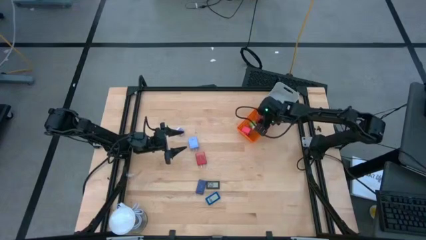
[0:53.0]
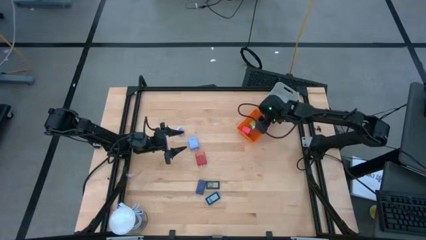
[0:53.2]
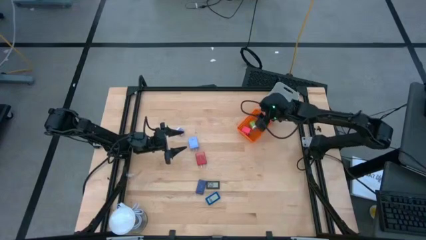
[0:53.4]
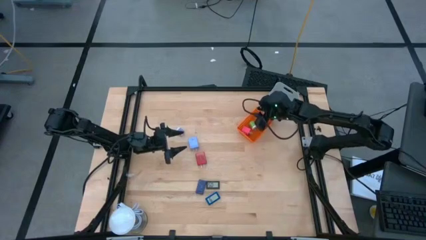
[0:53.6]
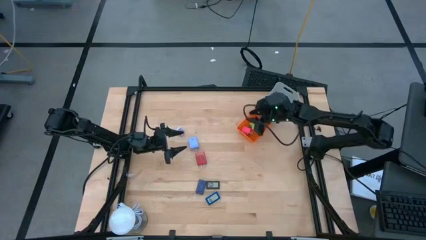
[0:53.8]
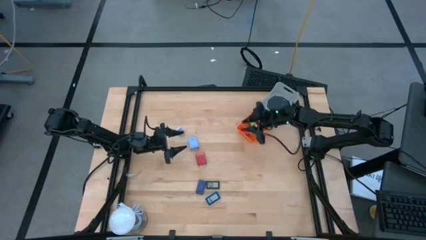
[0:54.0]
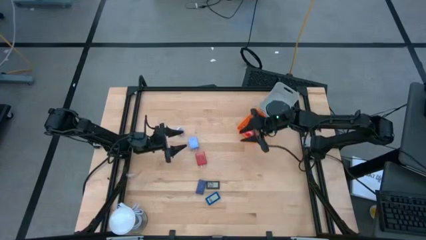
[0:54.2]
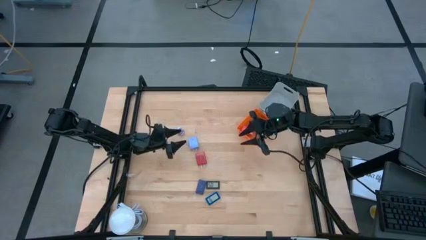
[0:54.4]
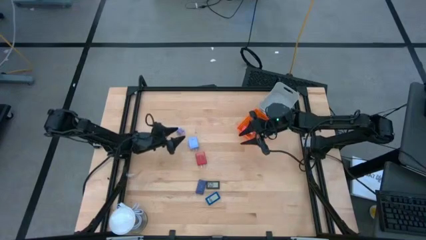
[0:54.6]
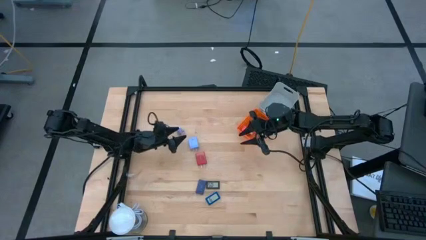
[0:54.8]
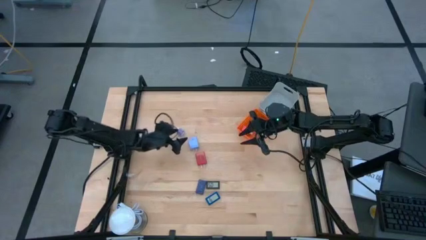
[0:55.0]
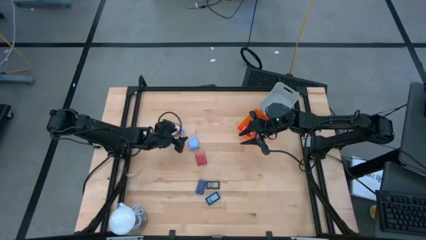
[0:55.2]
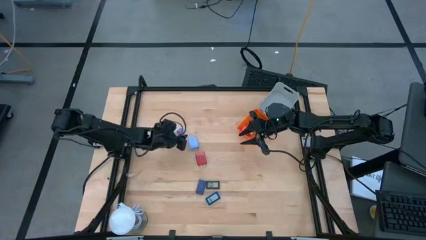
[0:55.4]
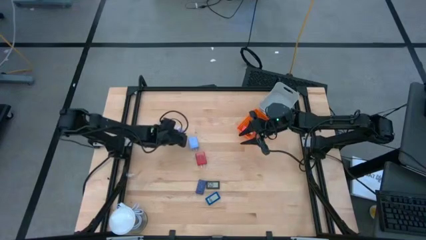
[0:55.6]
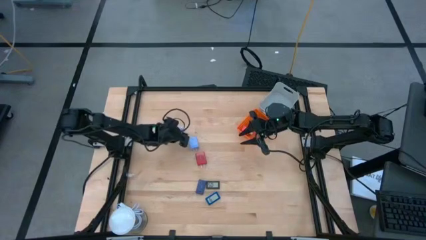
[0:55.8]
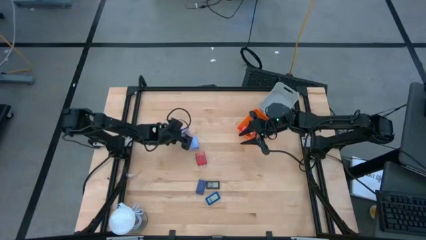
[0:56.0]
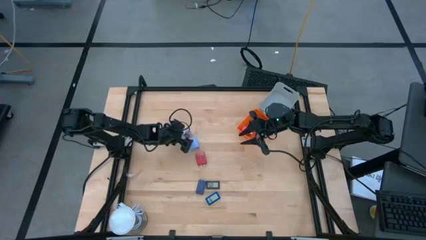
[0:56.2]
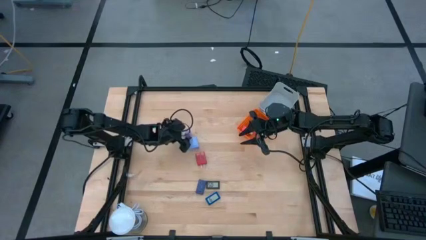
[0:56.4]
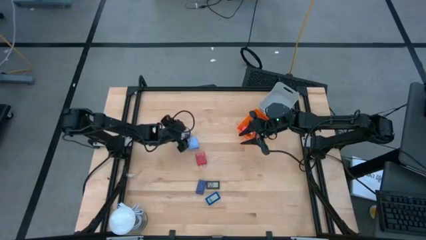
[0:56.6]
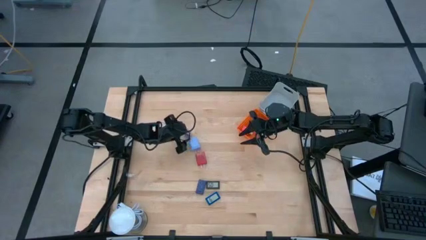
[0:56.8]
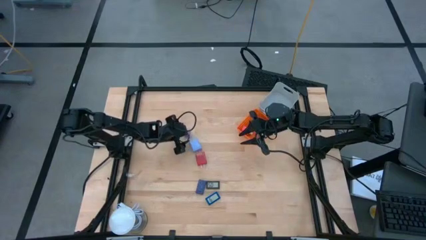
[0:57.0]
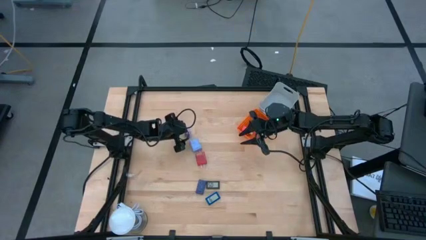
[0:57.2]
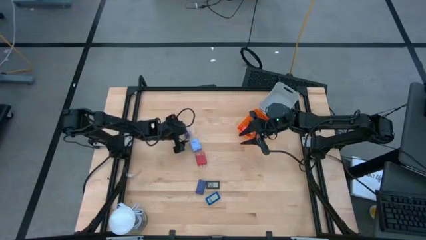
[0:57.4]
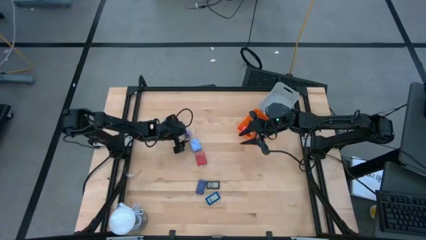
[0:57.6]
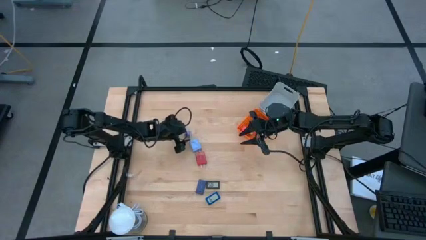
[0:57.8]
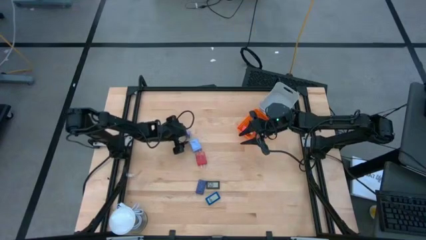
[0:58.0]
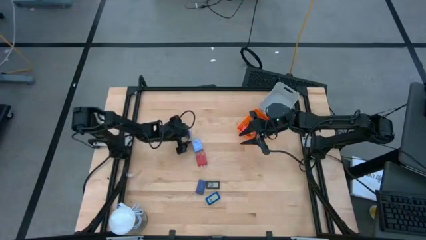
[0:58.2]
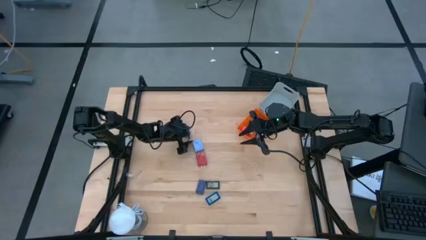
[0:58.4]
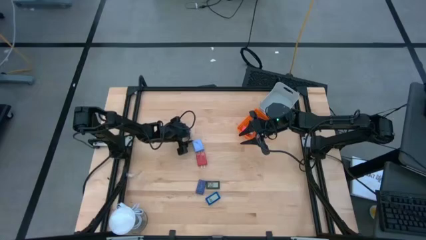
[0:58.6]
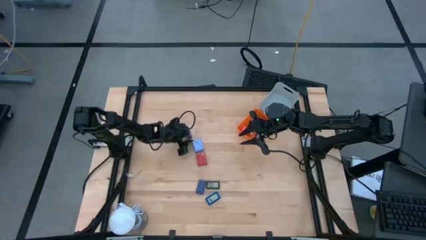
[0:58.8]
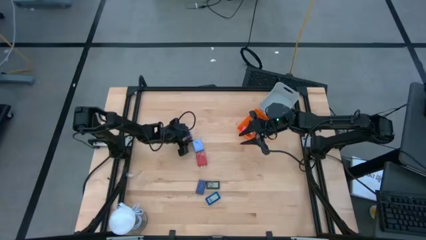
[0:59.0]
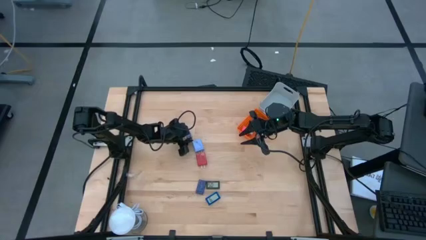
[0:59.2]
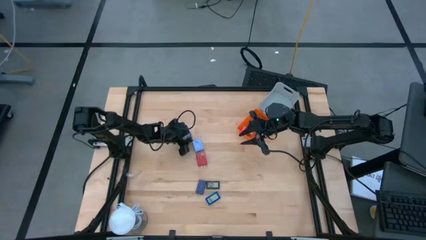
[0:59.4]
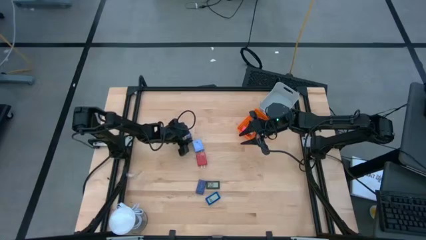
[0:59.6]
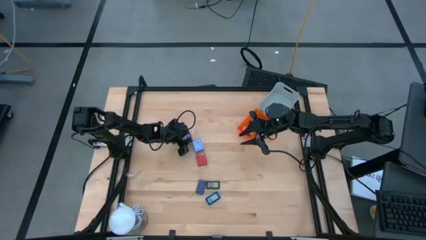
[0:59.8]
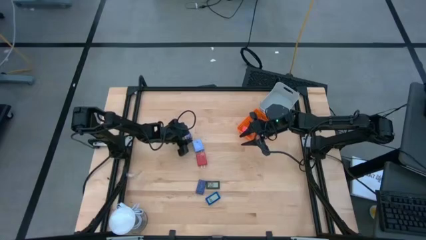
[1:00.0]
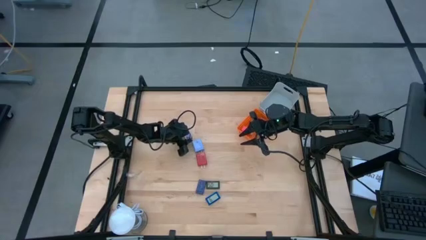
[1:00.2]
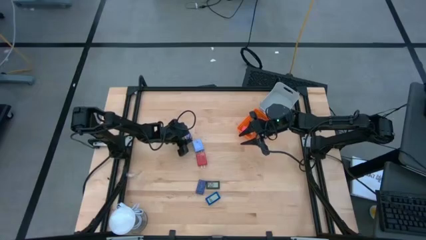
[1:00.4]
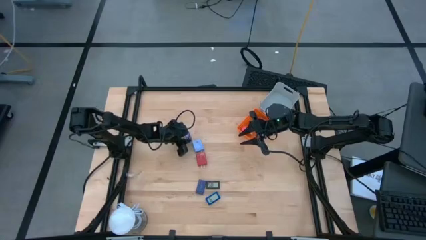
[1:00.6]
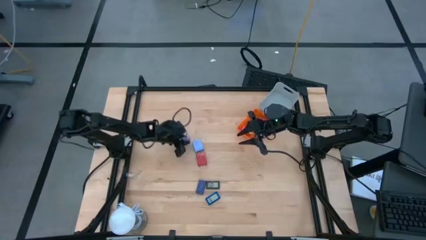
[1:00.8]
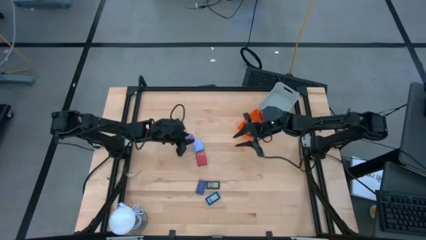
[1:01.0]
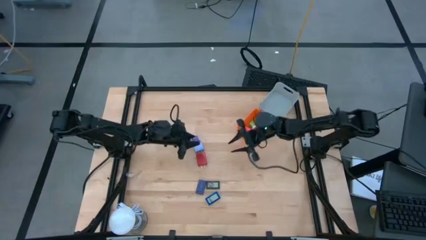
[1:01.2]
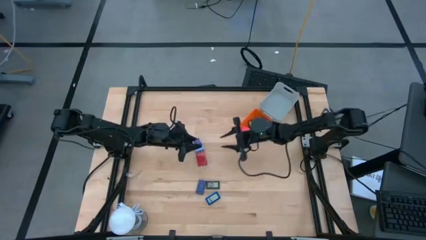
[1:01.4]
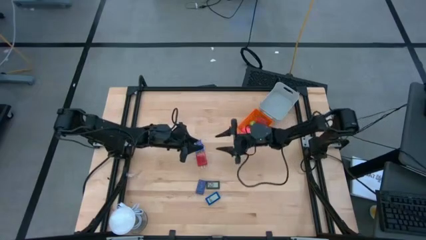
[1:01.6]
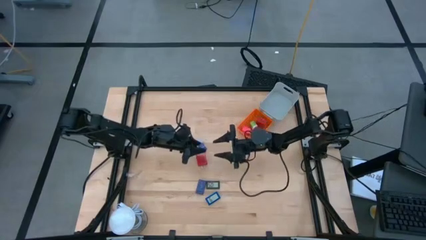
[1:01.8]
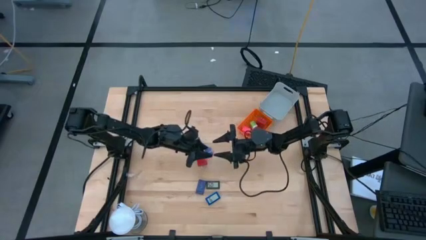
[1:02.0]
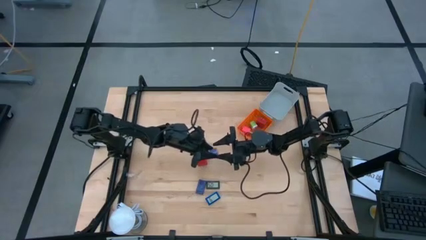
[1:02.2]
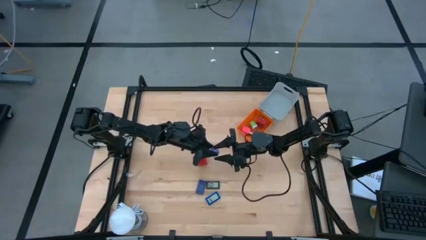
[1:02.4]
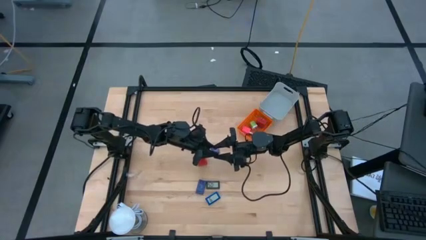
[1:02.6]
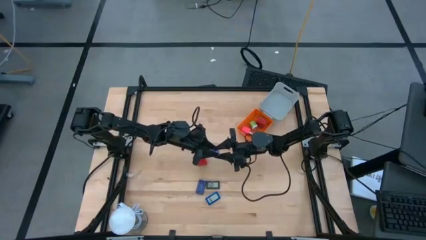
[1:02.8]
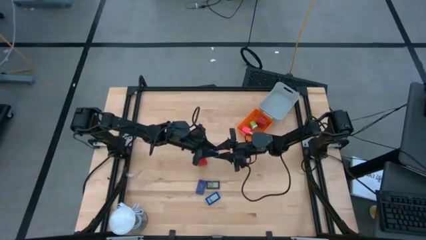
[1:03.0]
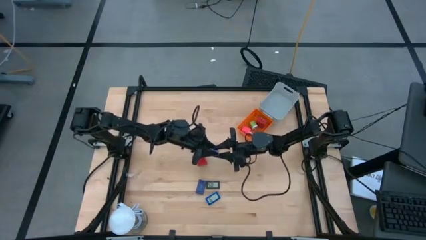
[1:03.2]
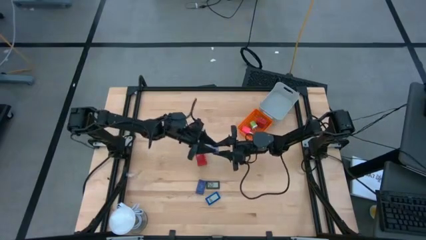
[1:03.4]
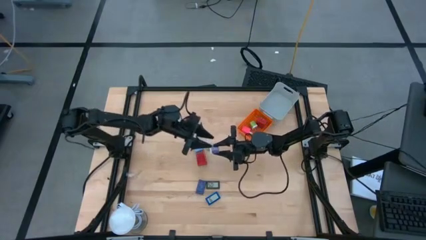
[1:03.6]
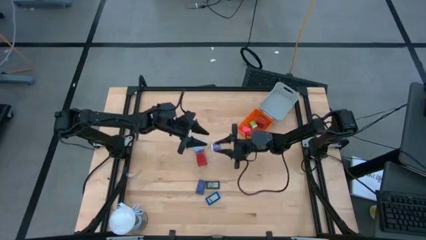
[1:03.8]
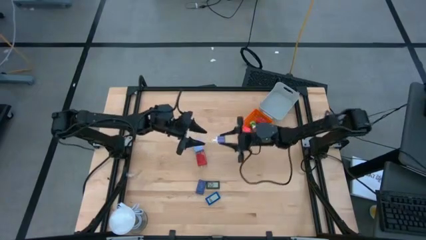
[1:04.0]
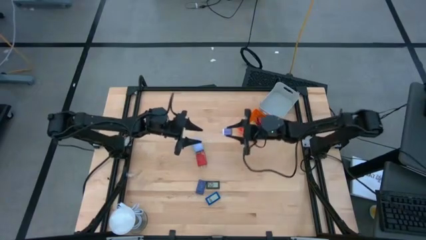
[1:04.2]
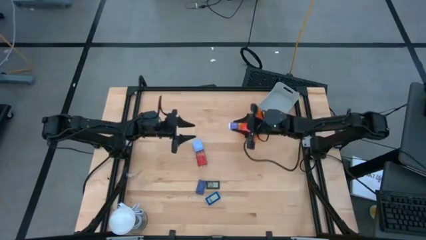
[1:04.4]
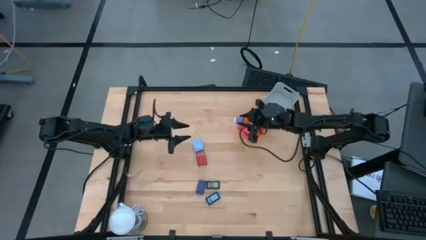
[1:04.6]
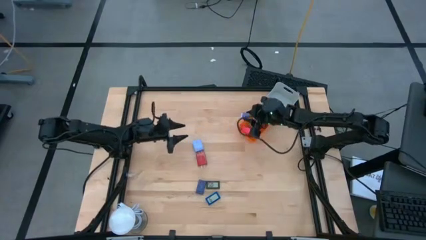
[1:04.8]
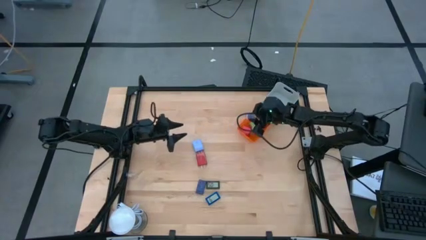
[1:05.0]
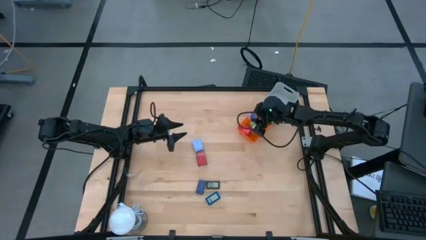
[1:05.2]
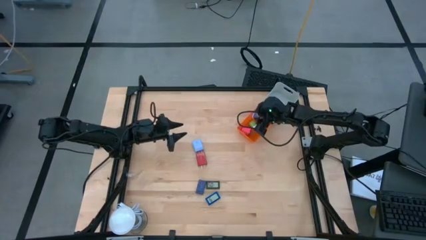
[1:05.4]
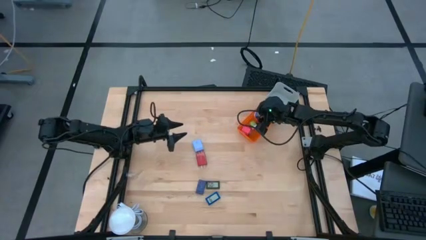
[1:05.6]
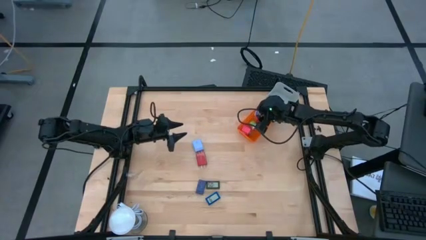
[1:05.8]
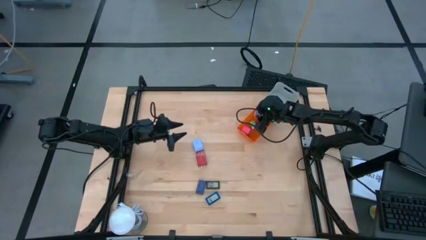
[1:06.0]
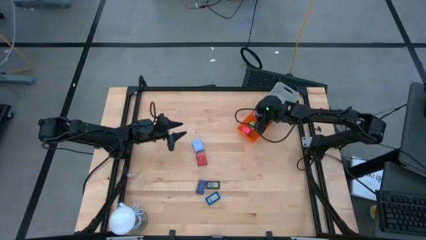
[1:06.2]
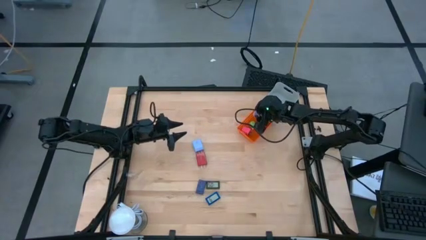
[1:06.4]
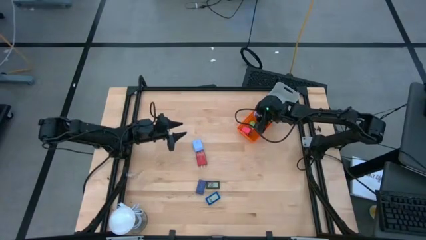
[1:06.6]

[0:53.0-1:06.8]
Task: Pick & Place Office items
Put the dark blue charger adapter into the orange bin

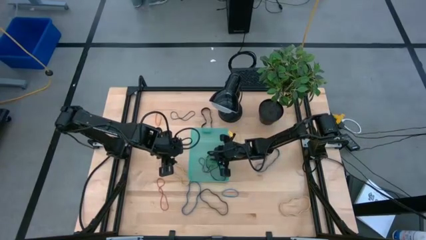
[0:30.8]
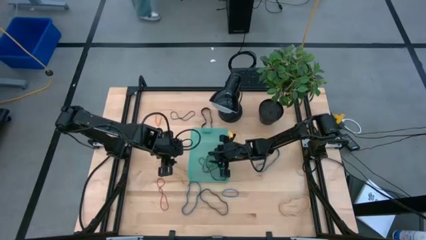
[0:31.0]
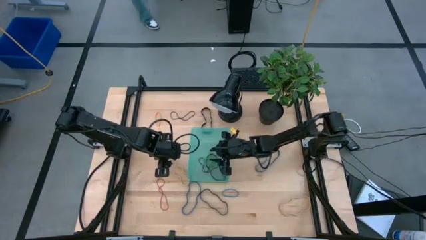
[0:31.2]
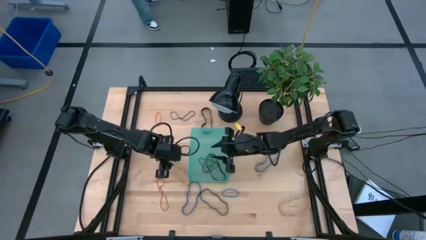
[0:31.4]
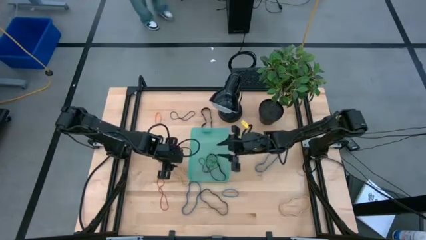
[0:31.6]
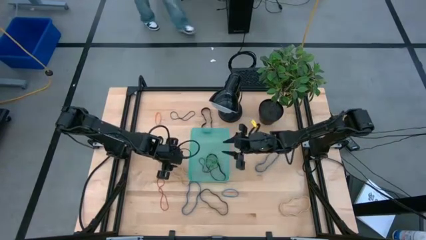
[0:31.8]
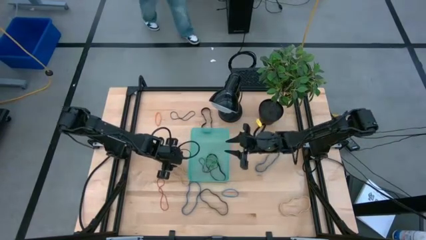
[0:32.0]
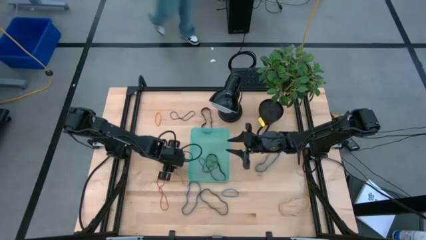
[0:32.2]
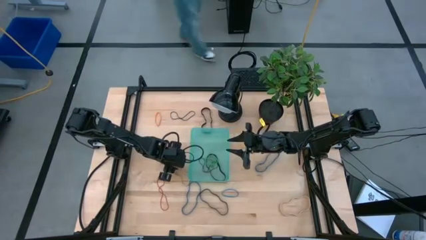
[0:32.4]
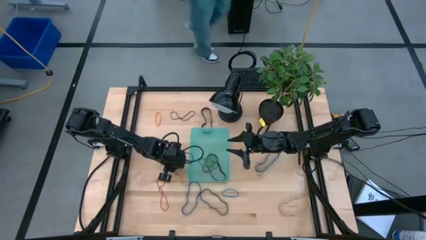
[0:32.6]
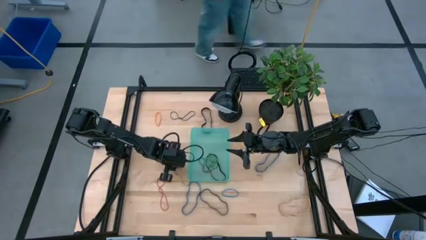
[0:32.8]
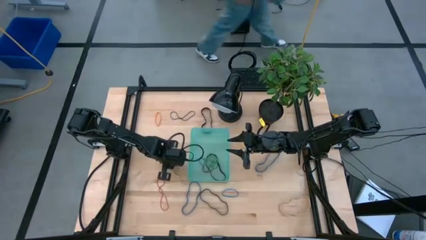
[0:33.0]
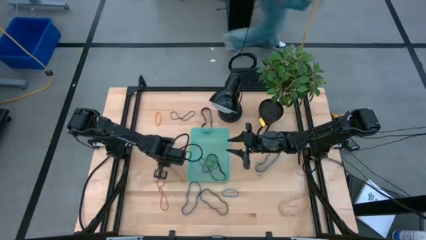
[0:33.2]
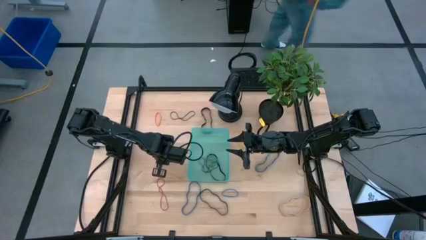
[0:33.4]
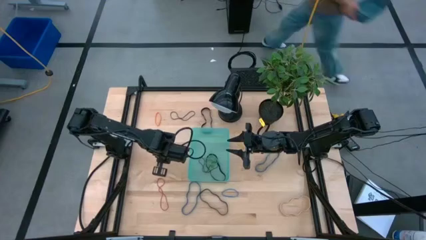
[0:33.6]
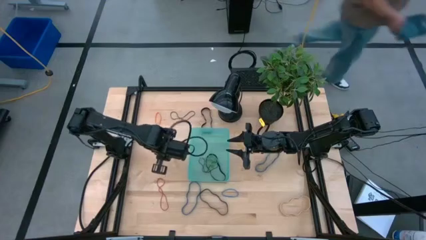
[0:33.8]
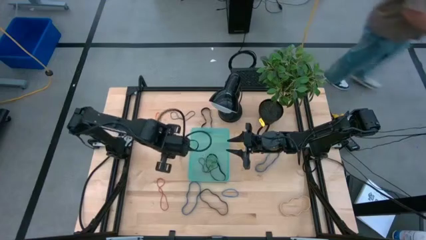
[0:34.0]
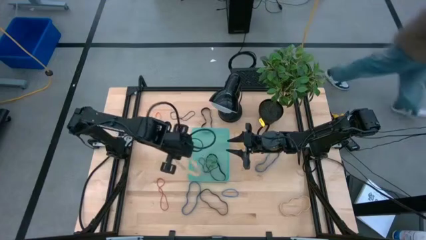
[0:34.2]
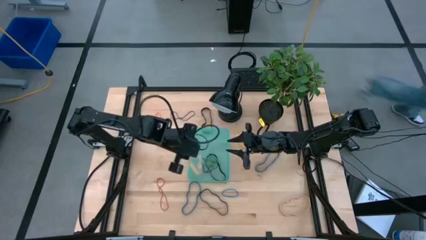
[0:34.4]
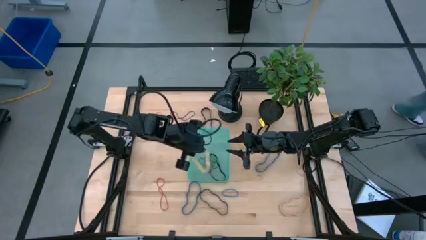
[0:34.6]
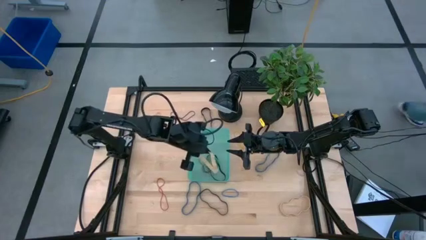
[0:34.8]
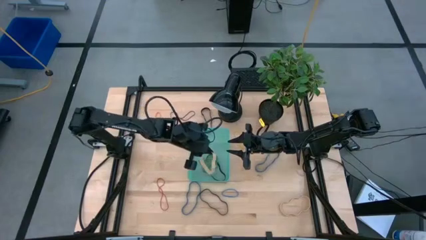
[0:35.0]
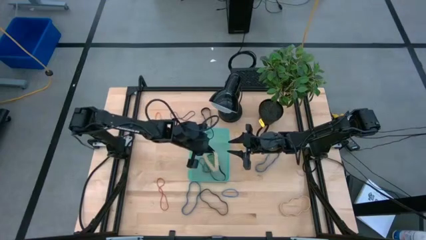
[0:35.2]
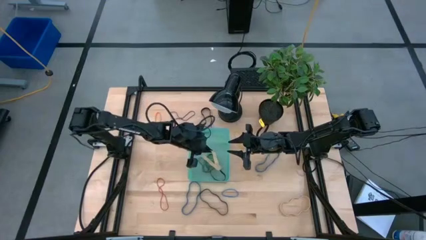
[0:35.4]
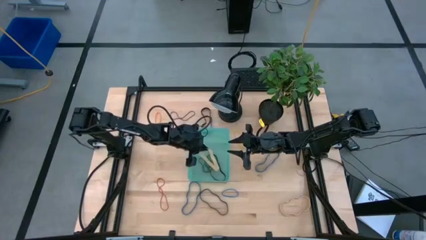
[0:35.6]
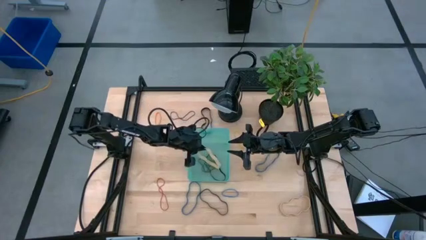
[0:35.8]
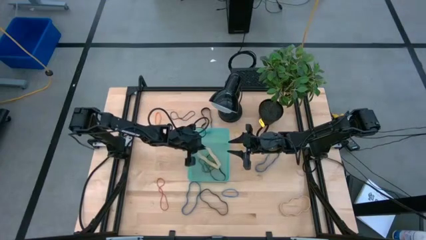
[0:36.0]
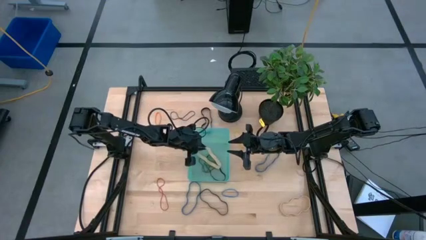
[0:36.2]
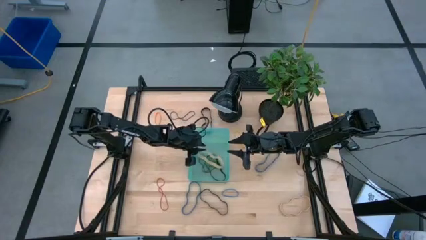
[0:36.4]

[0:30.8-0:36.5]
Task: Pick and place rubber bands into bin
Put the left white rubber band into the basket
